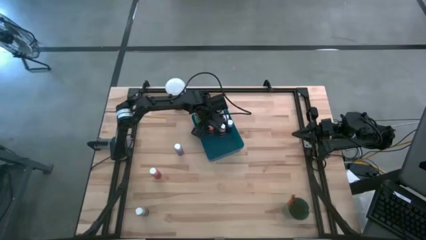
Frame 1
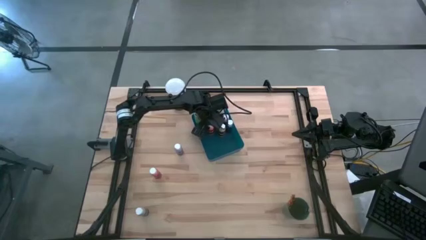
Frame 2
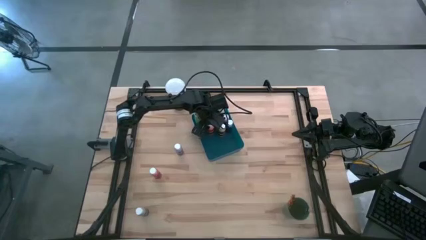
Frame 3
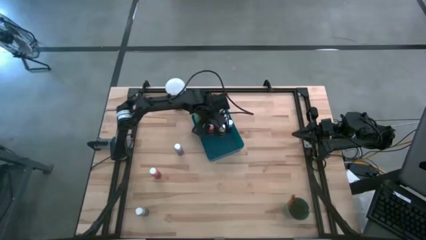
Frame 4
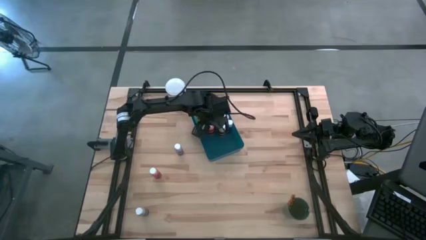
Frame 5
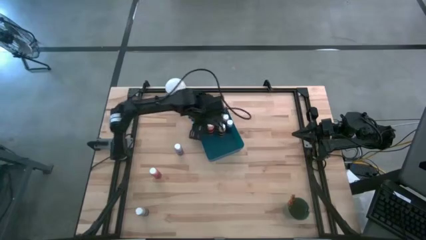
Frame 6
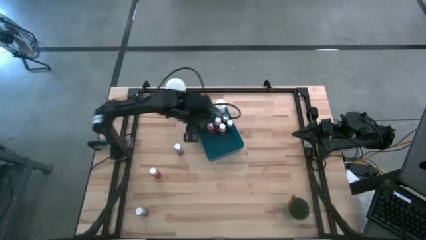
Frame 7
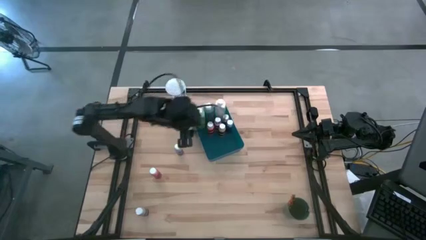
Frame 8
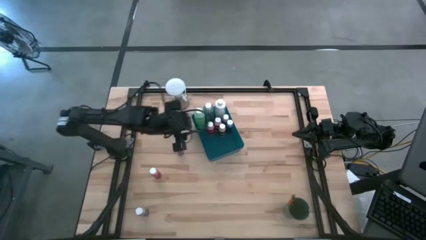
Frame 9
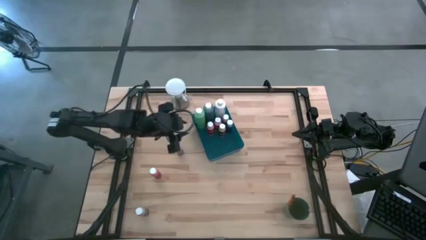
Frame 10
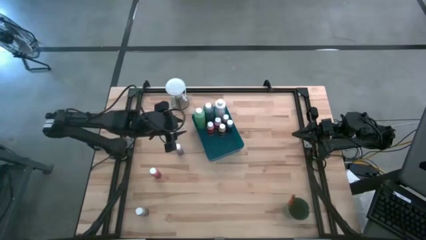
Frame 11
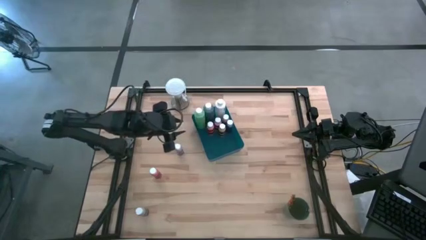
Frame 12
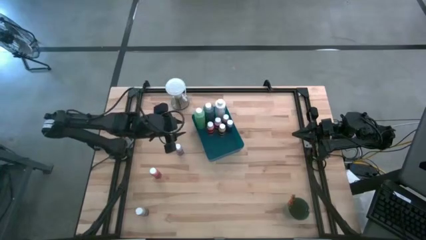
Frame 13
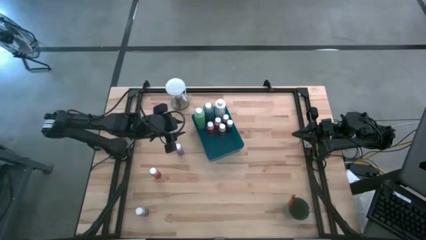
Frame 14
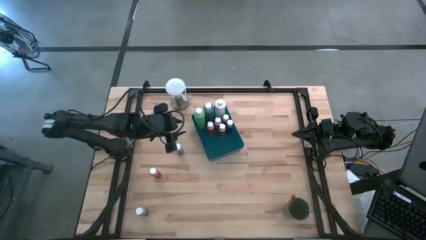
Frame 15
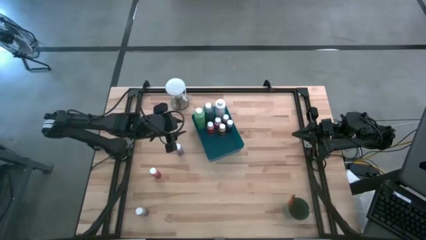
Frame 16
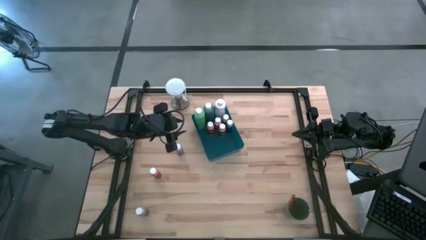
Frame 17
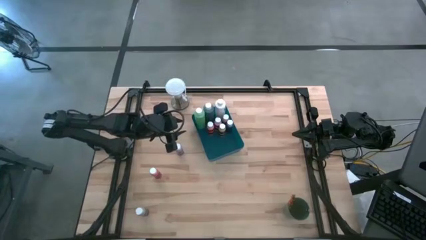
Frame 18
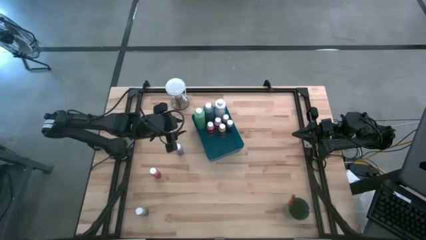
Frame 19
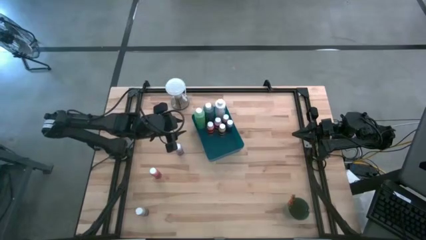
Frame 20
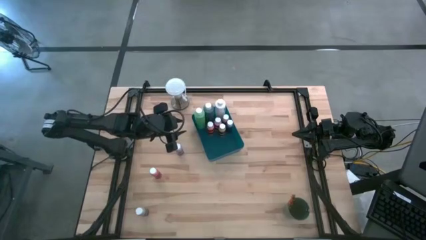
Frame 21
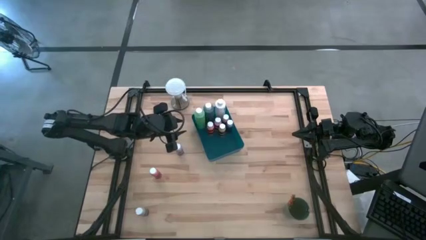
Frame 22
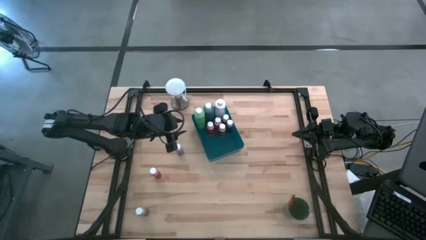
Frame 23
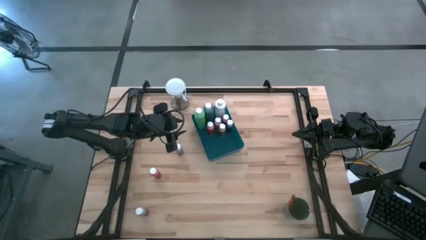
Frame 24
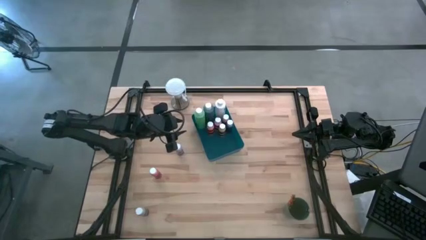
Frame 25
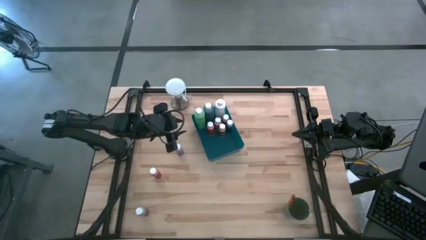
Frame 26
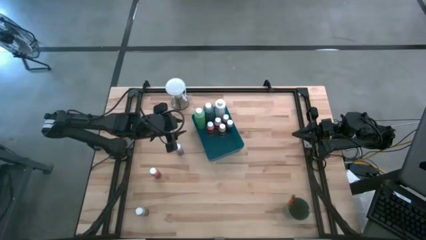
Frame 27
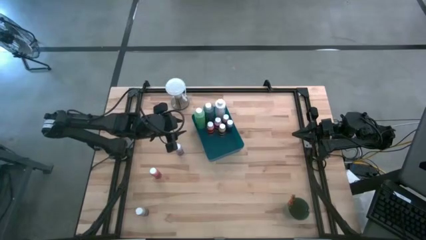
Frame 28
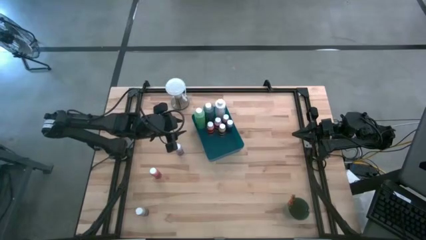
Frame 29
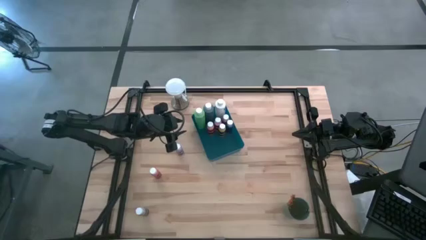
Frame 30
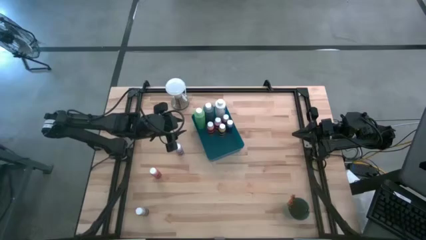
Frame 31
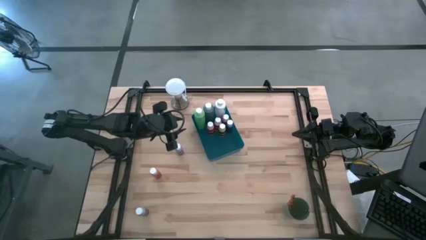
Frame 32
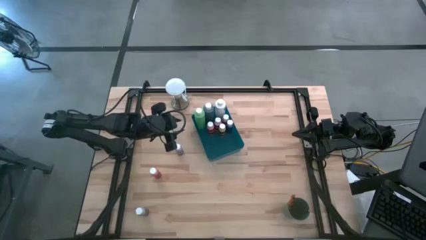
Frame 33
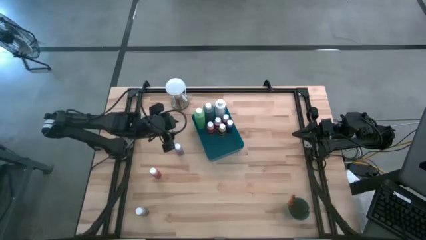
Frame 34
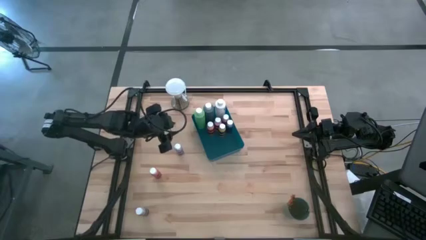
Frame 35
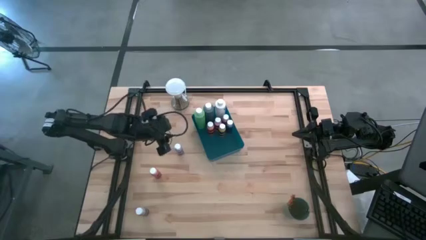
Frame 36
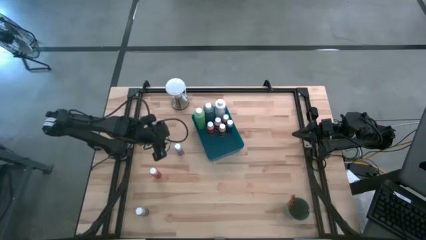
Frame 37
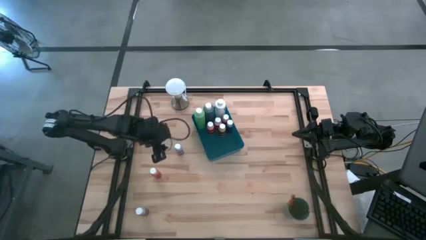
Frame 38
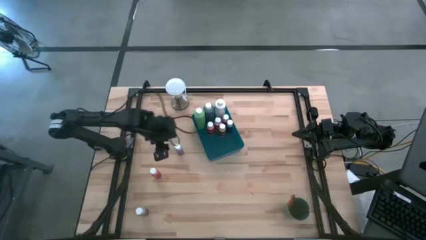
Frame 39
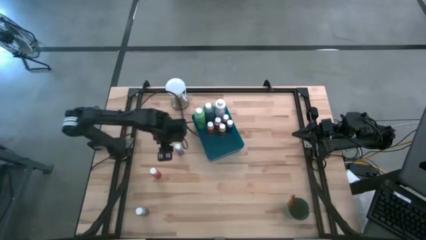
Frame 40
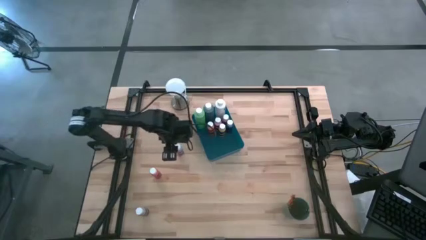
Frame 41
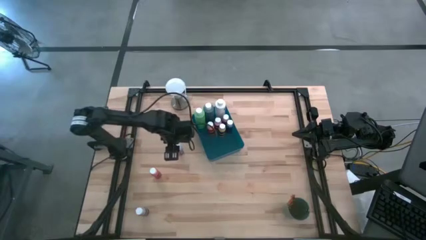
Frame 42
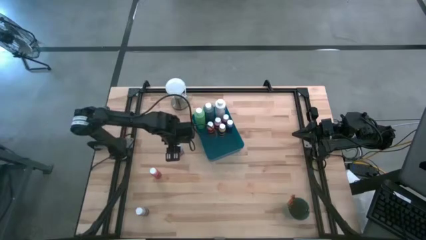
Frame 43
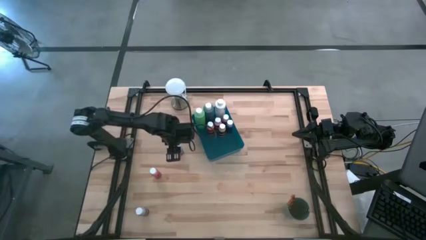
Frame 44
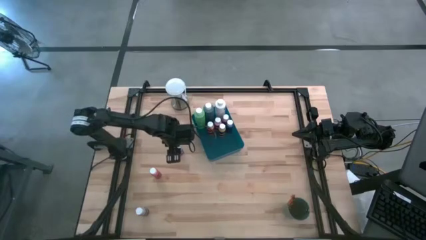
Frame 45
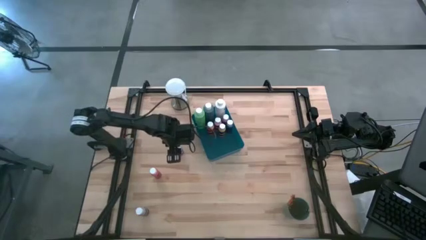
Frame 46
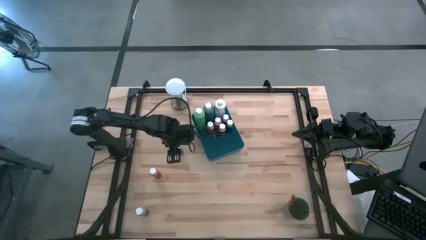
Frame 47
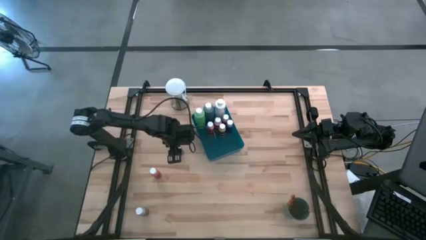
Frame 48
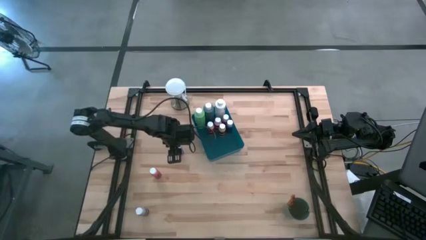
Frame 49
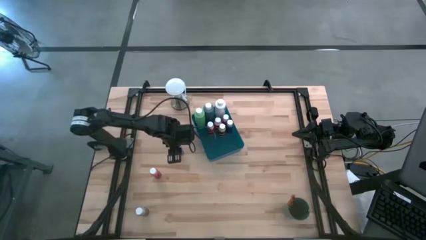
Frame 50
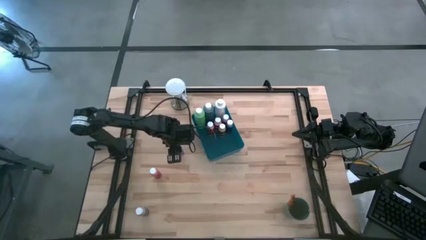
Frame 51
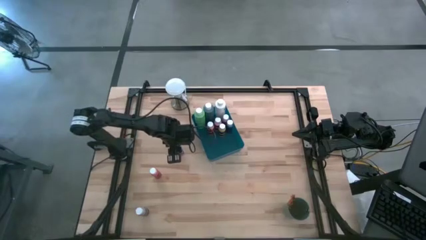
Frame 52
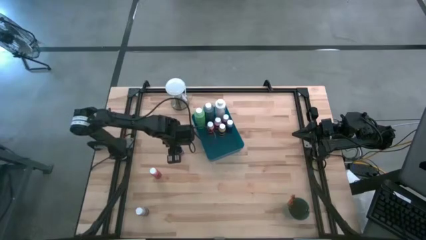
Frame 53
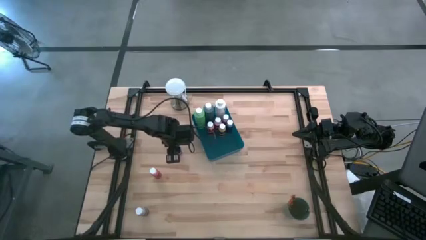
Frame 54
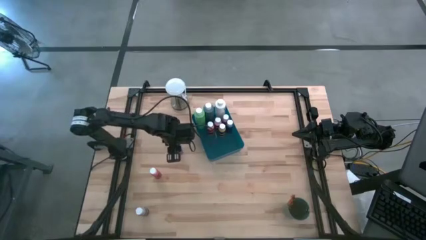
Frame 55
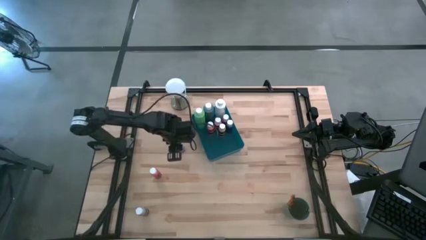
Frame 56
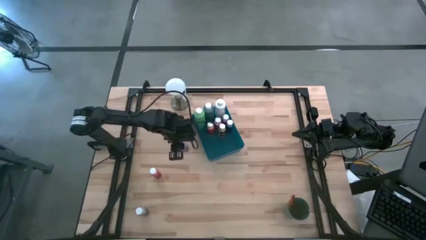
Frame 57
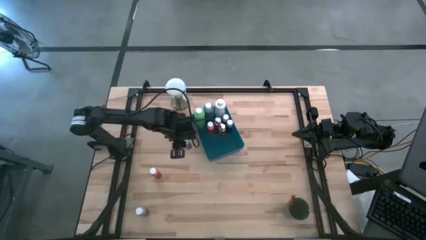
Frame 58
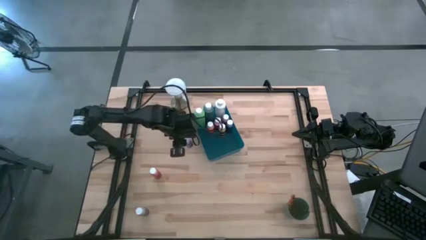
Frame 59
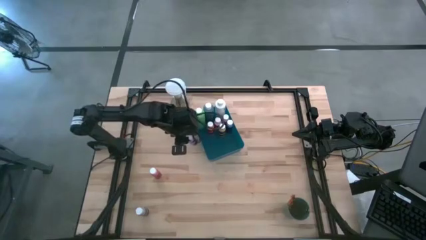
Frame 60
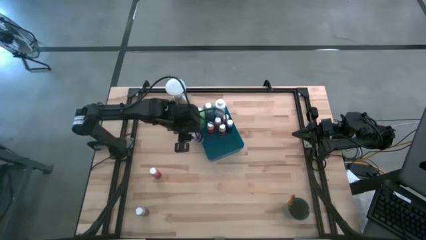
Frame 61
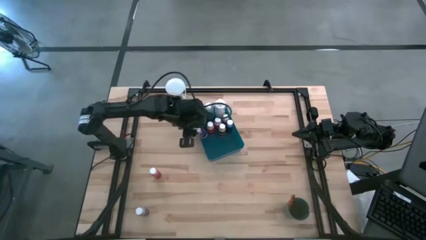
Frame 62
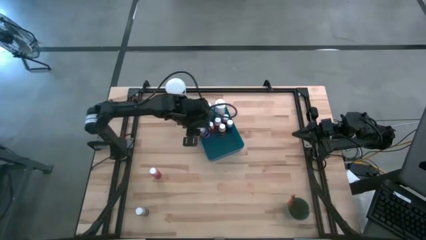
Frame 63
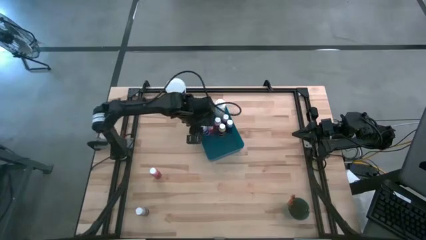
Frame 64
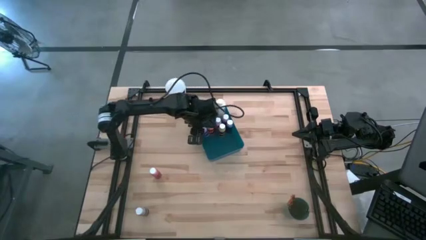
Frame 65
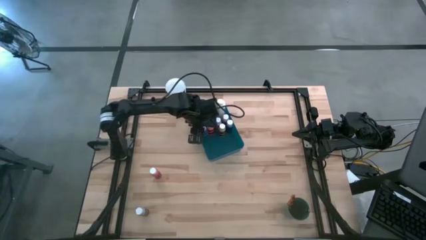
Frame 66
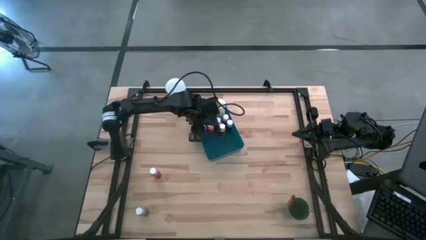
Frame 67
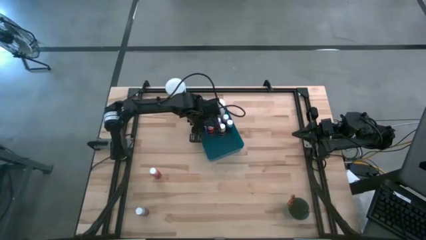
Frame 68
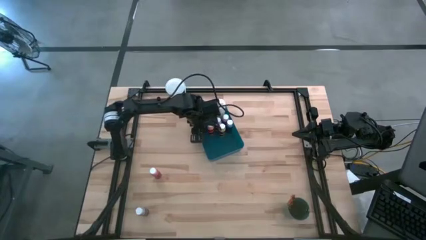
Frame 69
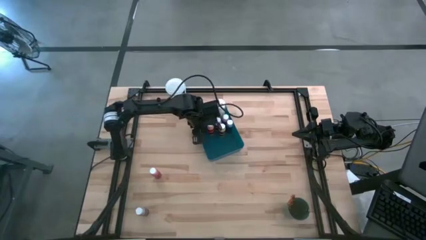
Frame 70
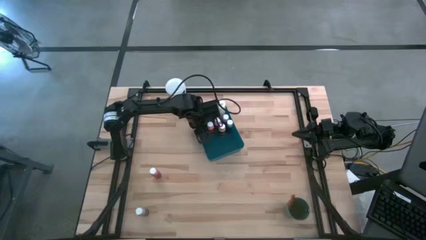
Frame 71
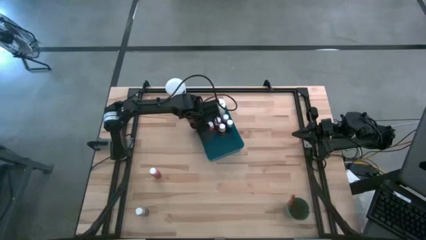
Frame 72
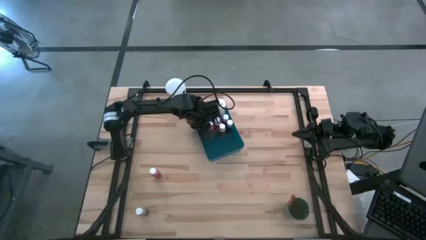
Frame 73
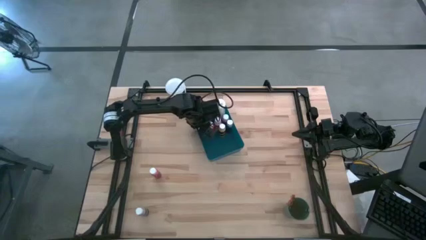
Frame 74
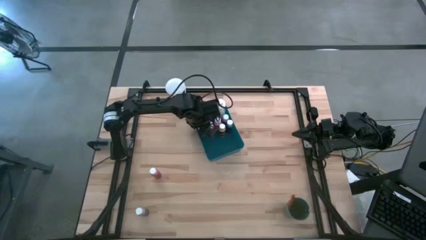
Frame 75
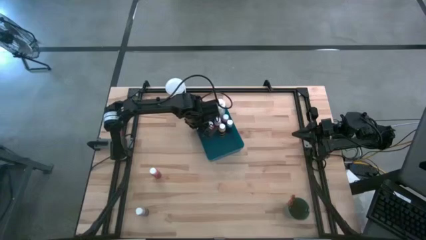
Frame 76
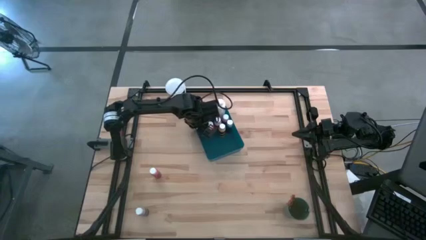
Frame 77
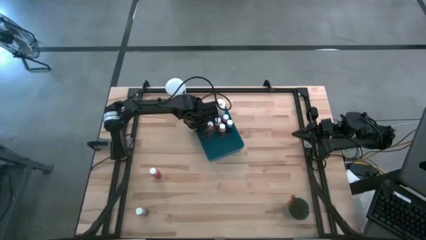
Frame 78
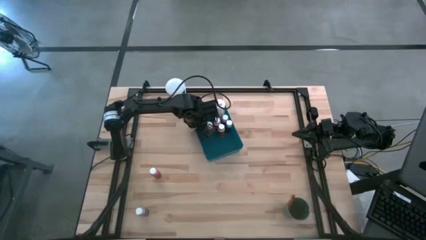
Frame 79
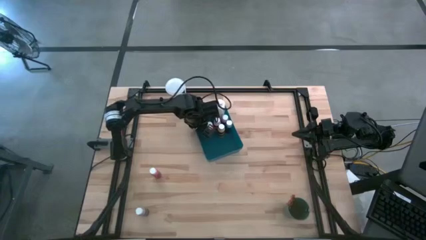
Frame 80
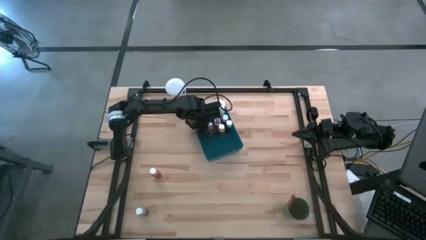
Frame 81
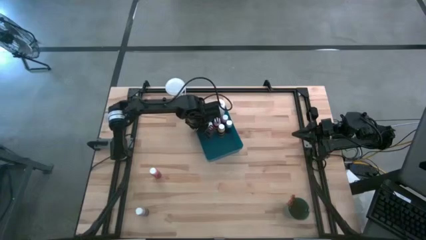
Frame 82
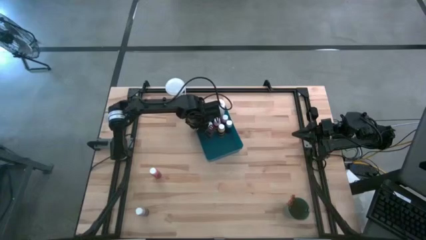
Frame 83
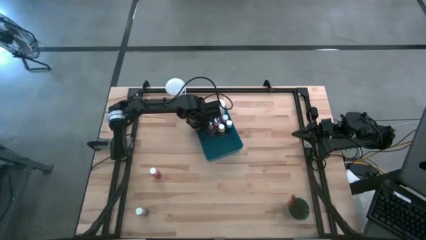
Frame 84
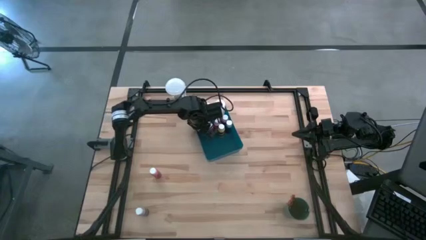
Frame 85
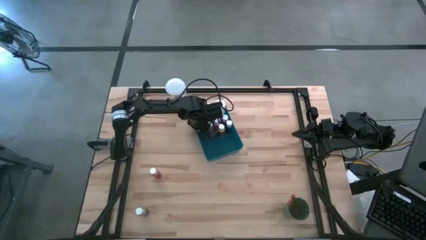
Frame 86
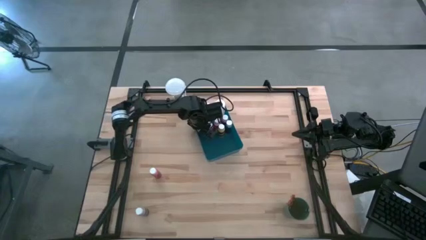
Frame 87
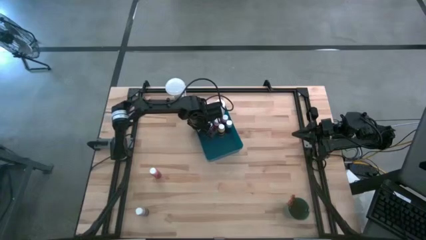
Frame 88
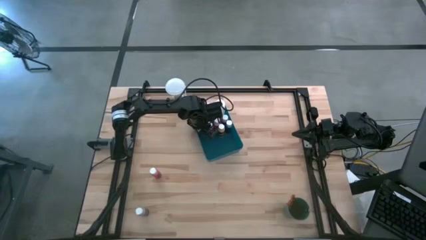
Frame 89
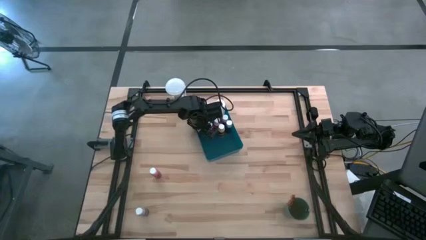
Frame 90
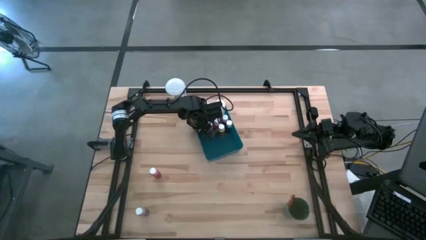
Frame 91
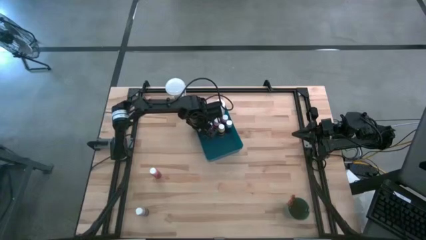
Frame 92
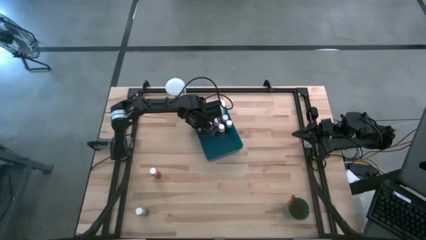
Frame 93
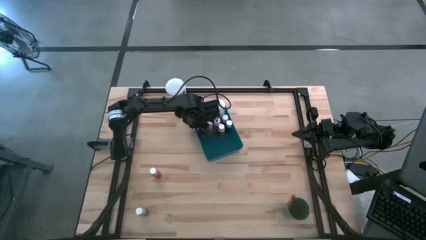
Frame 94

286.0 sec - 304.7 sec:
Task: Pick & Place Paint Supplies
Put the purple paint bottle into the blue bin
